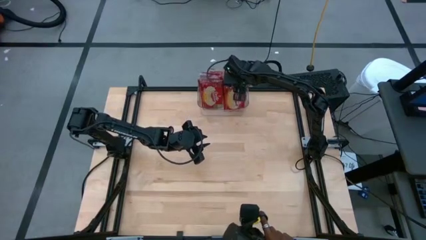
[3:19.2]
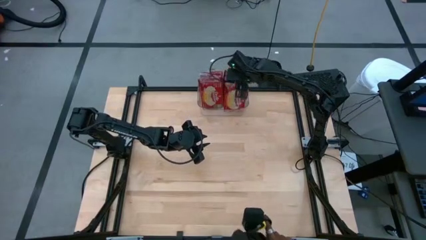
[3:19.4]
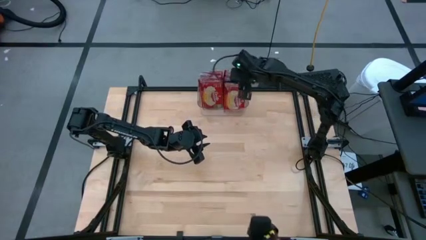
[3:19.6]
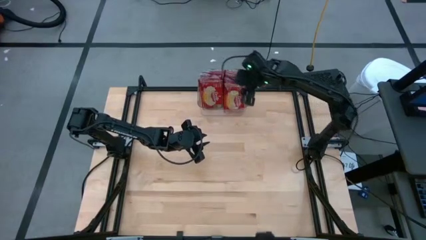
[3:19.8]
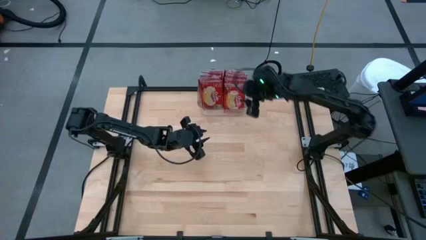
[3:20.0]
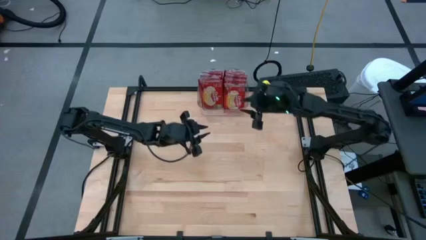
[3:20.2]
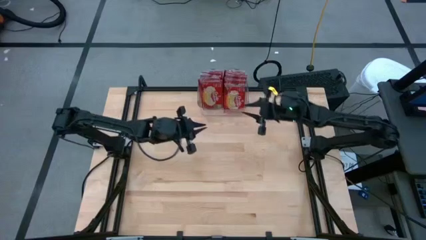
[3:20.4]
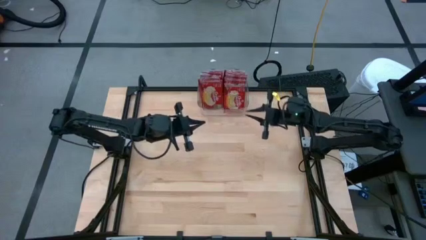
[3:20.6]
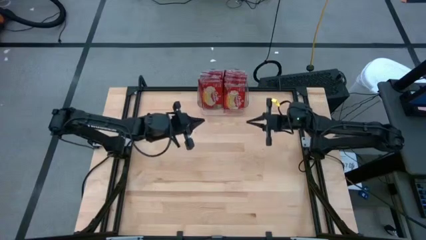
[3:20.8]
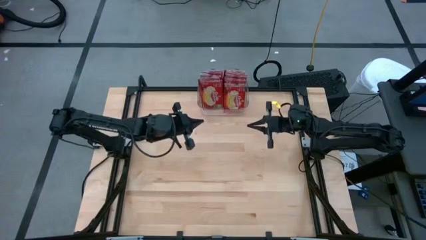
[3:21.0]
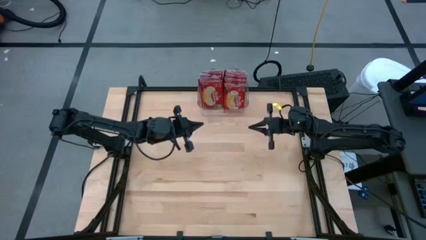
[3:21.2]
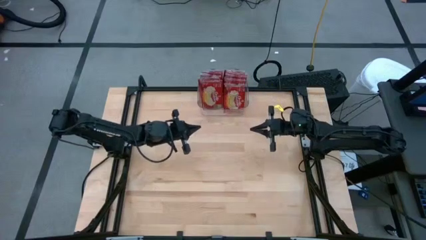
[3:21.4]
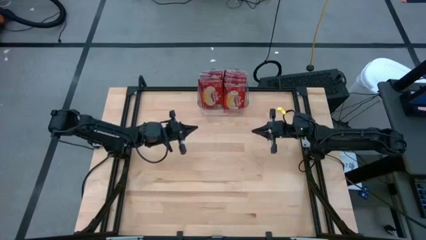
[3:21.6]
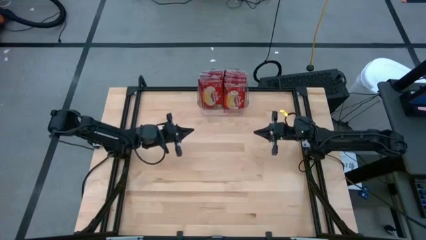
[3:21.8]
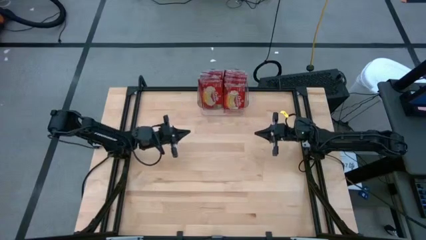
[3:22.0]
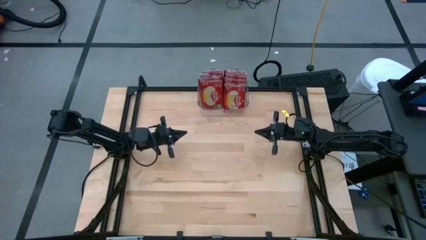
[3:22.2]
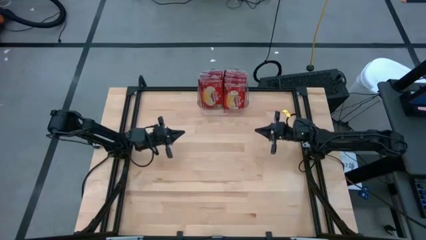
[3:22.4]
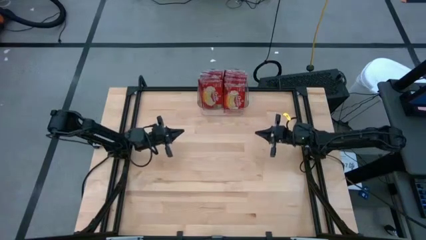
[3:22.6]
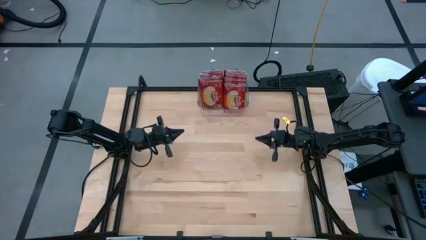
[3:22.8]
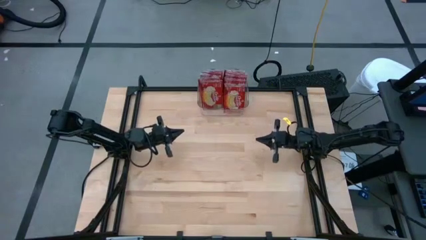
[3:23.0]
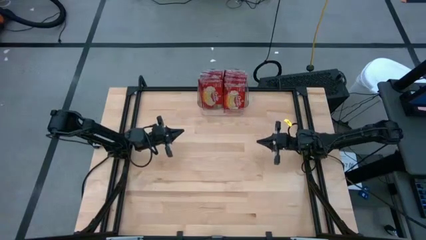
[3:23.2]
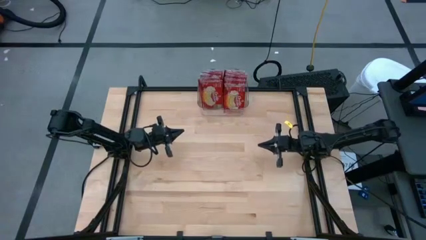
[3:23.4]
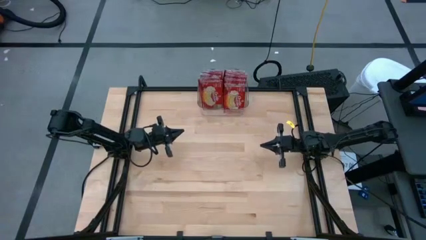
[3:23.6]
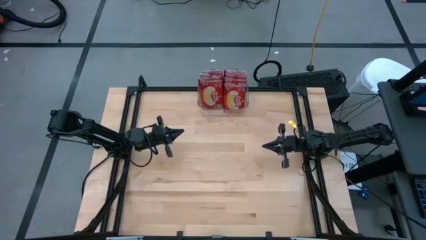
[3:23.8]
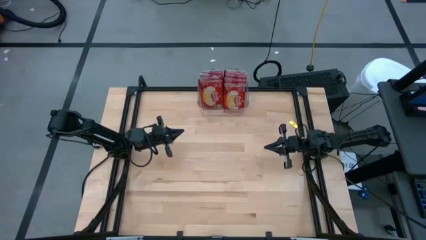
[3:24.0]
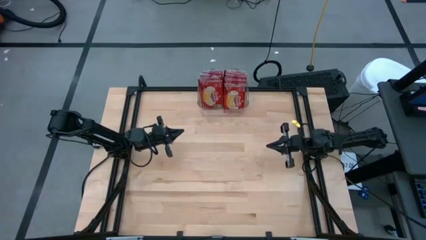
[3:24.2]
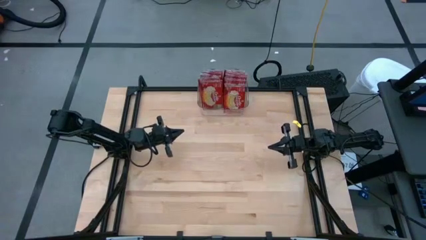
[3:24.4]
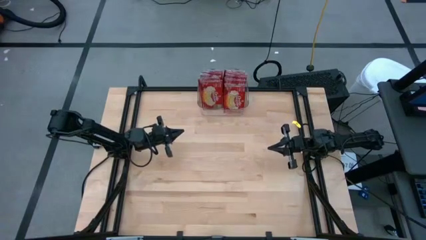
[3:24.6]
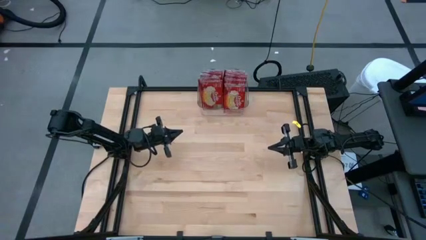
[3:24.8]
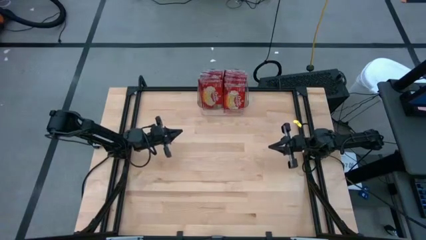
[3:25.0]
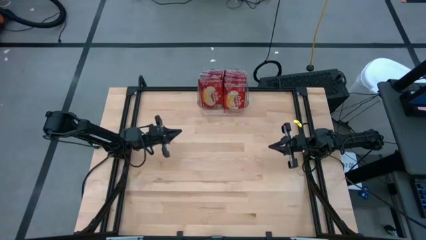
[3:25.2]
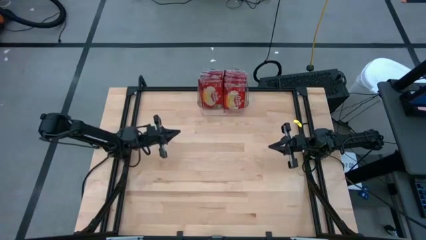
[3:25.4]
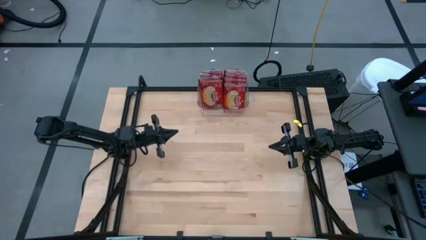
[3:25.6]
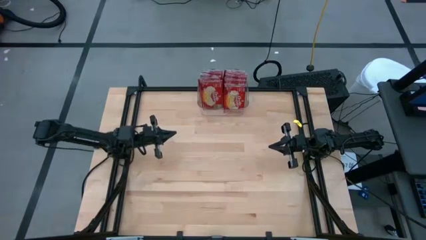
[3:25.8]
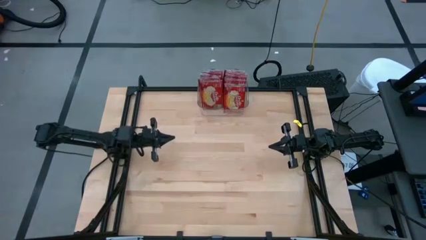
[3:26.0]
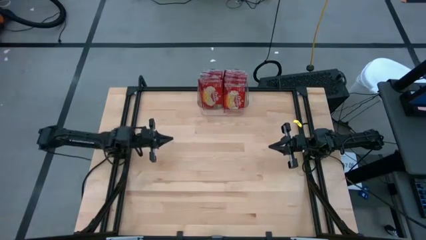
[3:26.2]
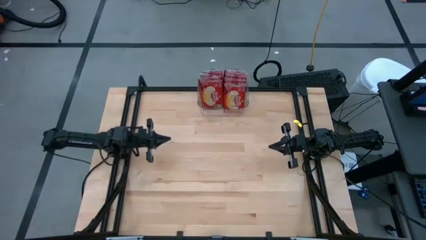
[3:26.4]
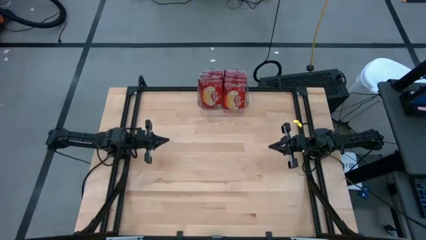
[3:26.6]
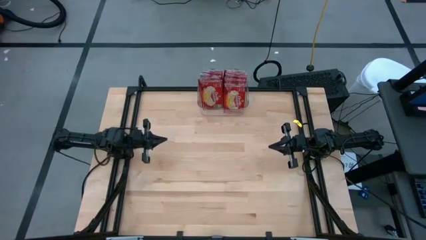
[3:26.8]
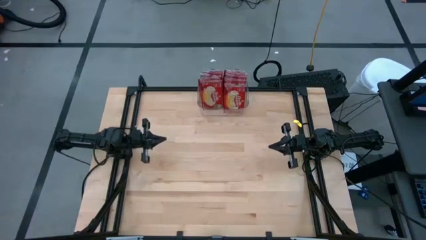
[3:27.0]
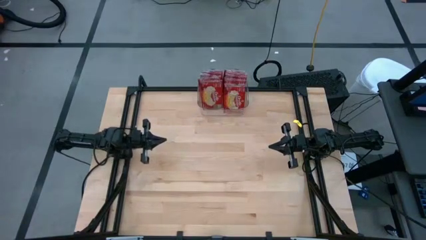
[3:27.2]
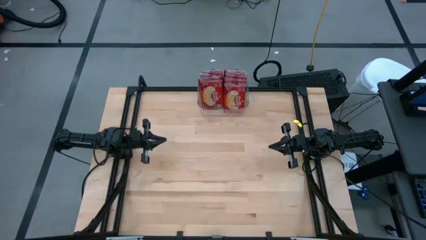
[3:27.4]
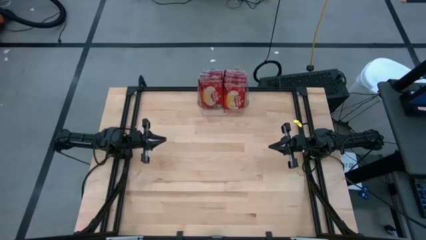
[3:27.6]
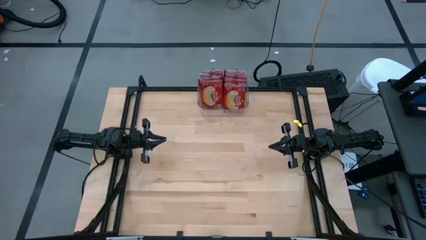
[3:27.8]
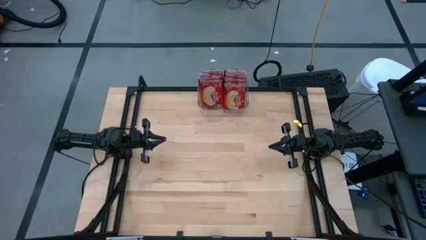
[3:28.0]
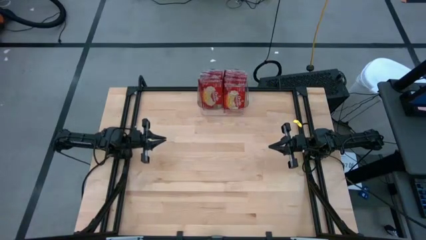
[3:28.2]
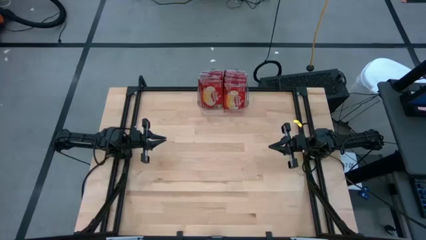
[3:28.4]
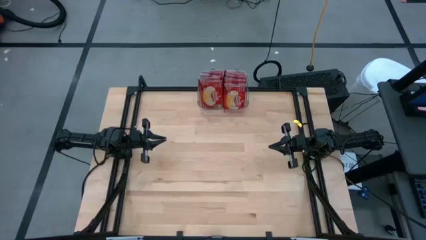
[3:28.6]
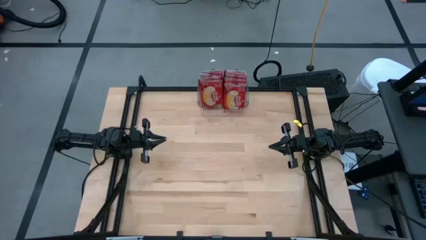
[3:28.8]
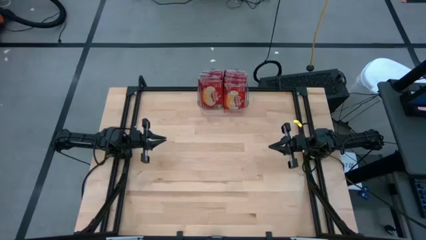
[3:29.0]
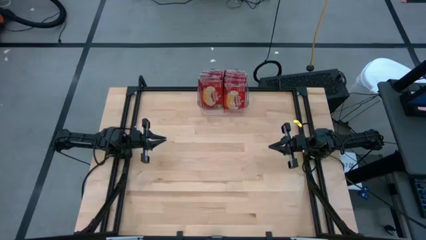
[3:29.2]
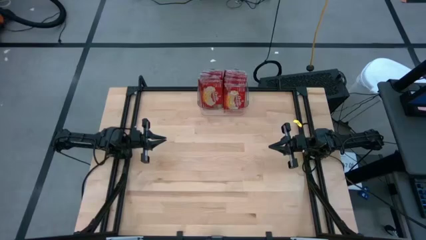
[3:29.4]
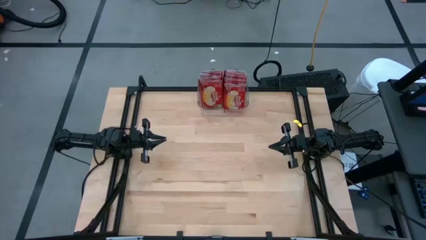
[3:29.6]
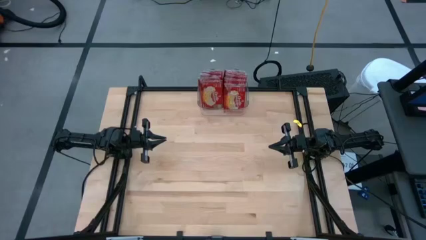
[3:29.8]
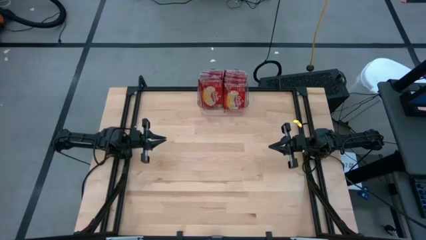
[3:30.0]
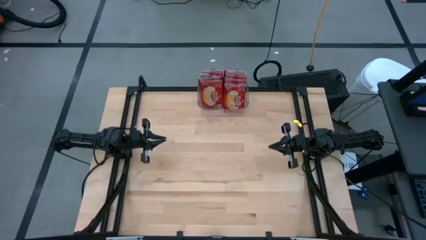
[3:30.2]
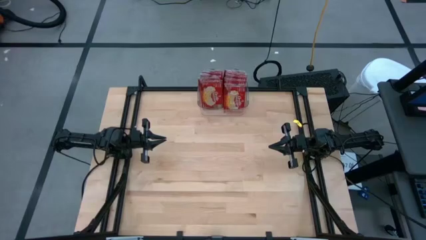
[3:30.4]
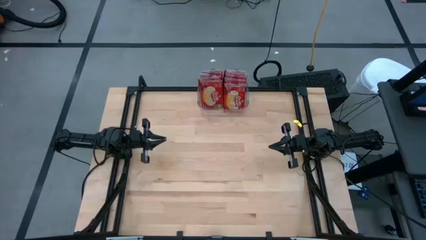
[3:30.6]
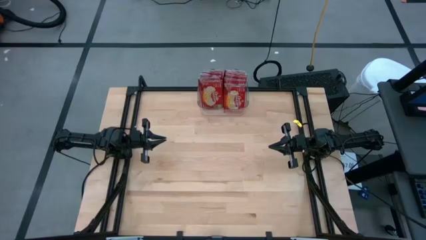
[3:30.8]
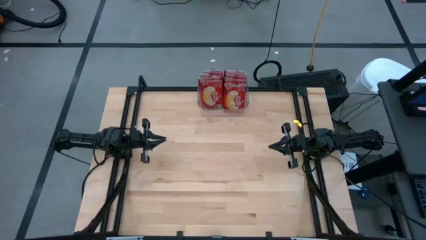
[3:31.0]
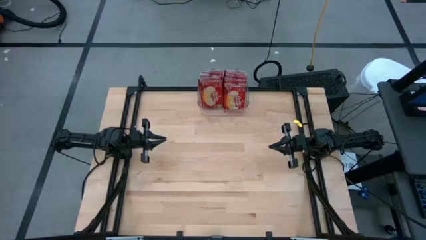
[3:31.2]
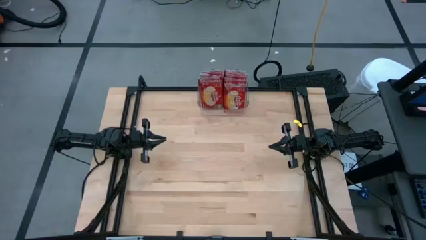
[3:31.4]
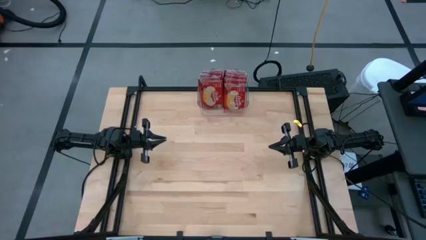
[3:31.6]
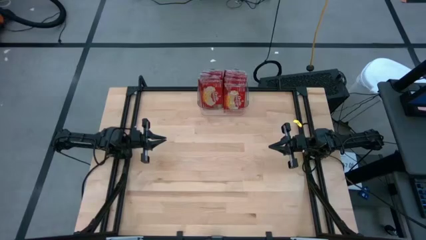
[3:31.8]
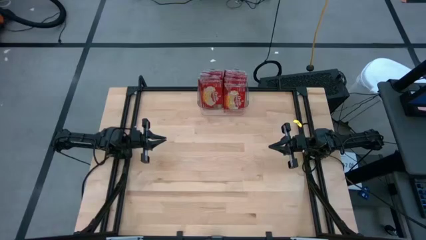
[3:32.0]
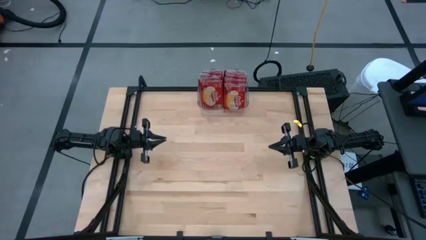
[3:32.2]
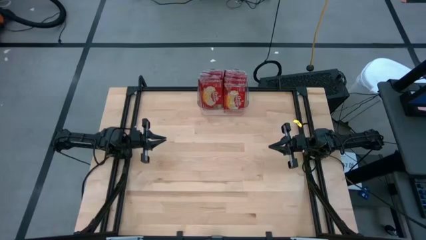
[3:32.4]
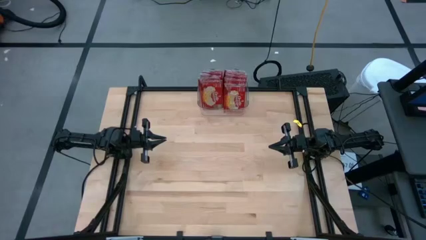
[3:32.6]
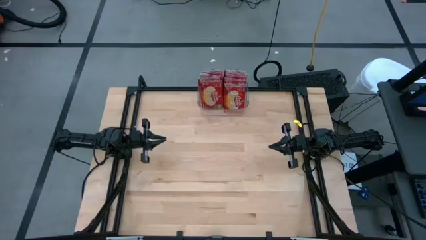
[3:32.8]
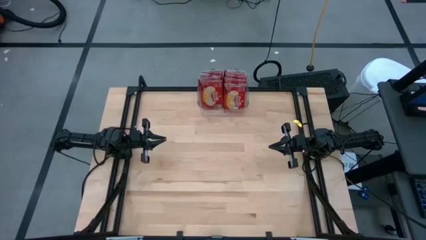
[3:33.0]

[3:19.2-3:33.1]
Task: Sort popcorn bags into baskets
Return to Home Position

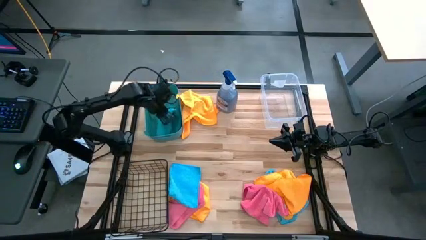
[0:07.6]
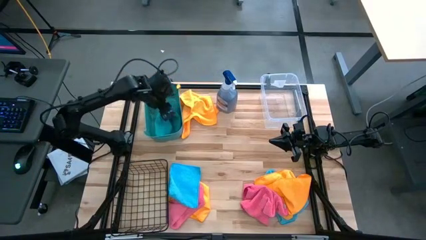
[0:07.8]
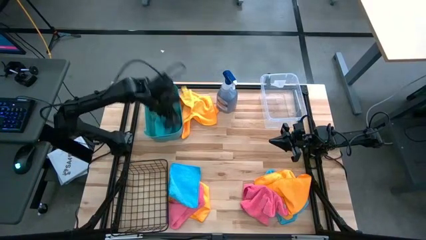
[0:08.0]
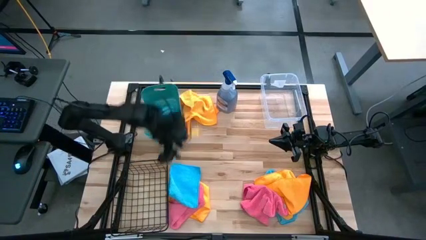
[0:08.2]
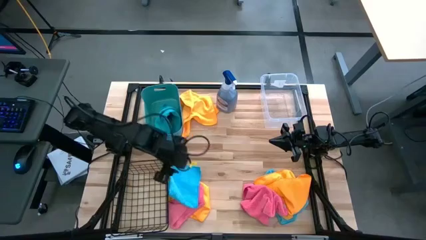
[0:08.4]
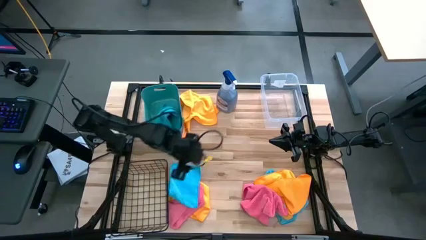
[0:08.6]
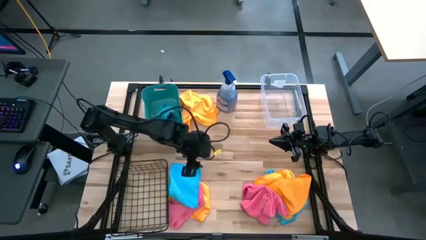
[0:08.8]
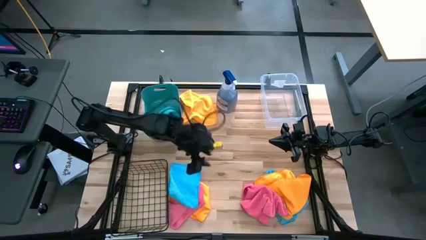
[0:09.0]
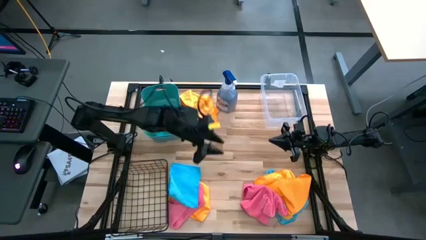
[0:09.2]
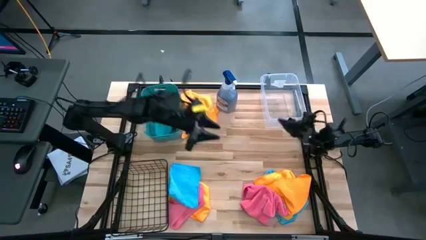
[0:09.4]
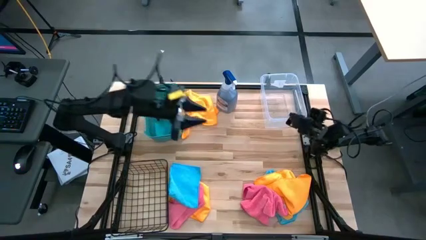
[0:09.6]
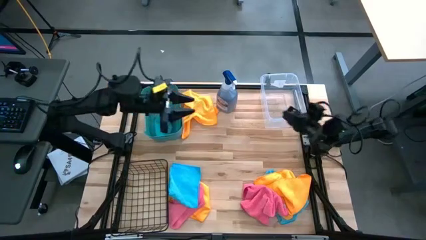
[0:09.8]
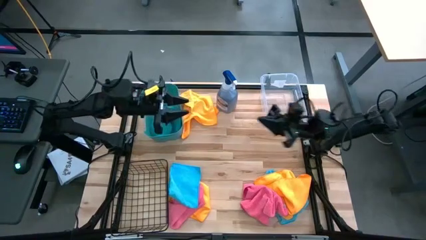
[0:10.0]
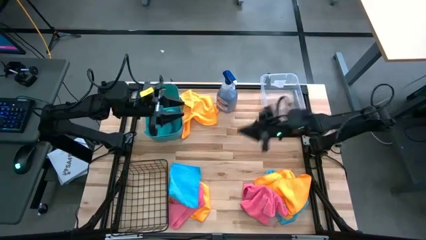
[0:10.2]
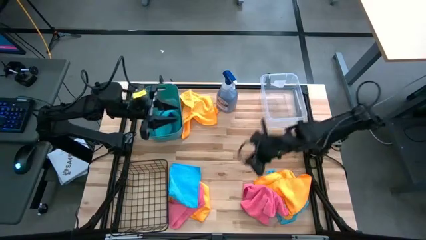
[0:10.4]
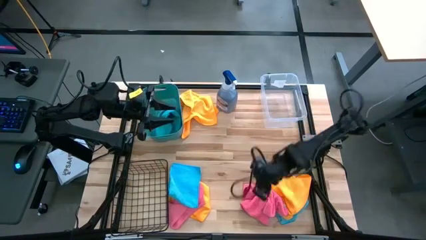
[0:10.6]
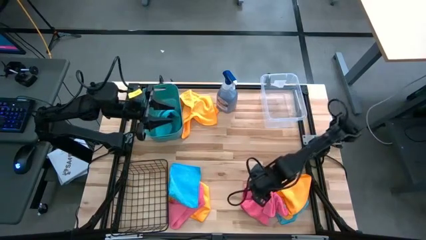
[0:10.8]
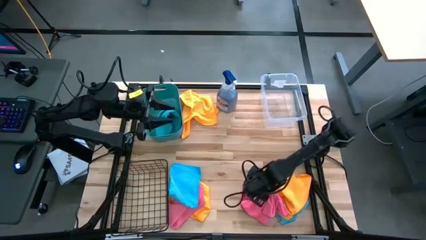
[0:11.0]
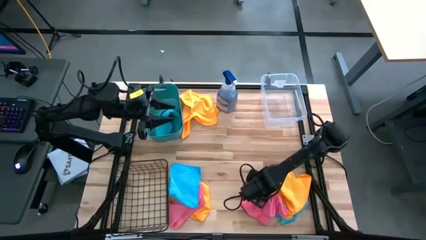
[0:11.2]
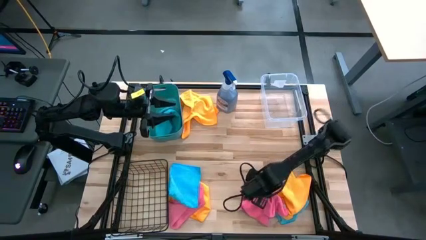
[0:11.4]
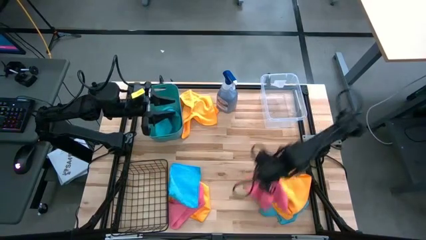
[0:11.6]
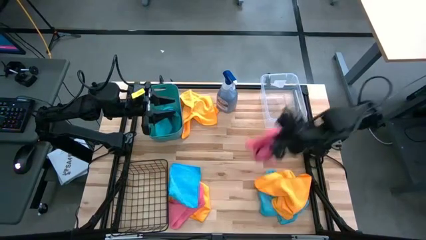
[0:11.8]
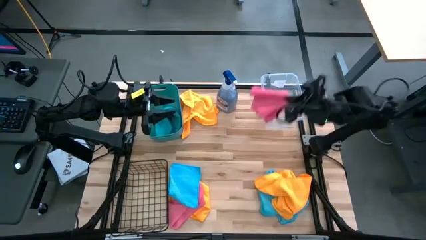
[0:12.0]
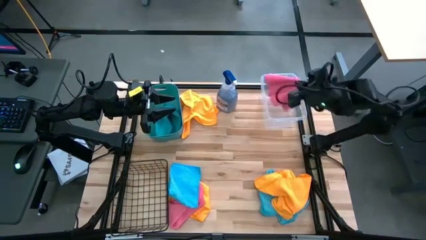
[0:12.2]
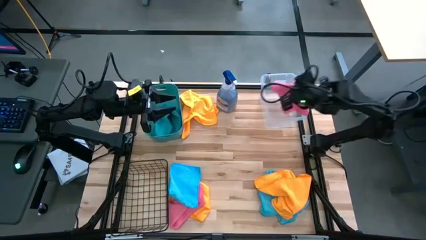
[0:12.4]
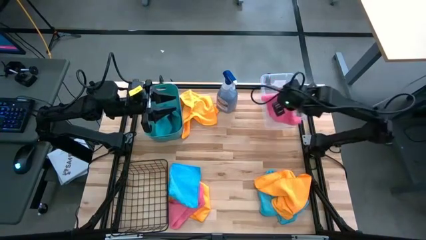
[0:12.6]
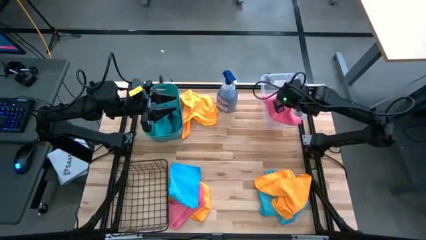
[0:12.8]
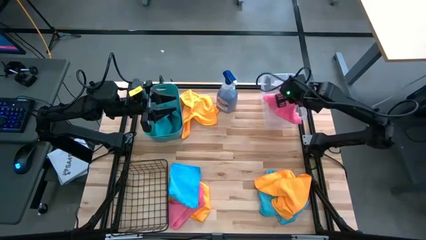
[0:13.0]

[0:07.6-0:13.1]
Task: Sort microfiber towel by color & place in baskets
Put the right pink towel in the transparent bin
